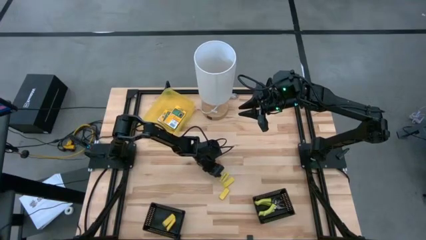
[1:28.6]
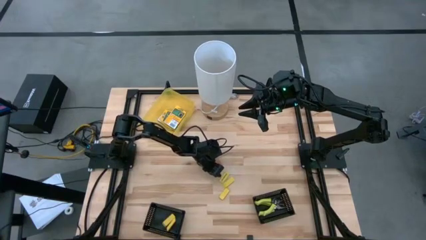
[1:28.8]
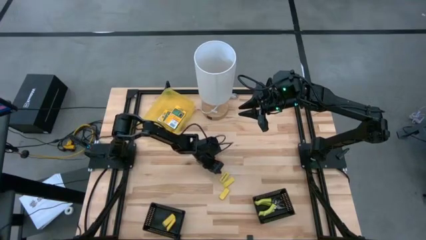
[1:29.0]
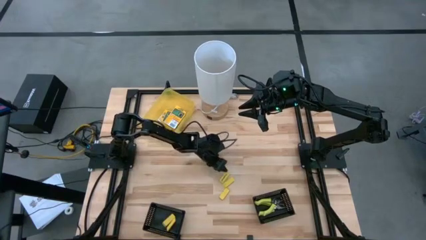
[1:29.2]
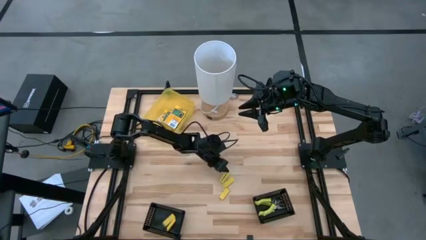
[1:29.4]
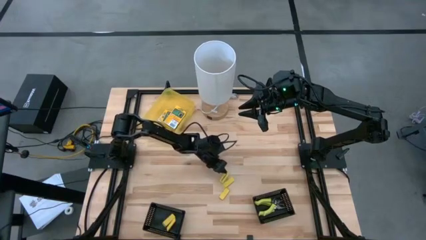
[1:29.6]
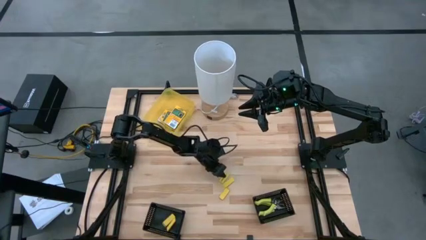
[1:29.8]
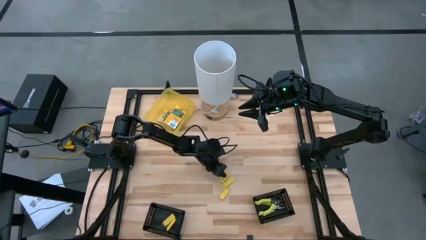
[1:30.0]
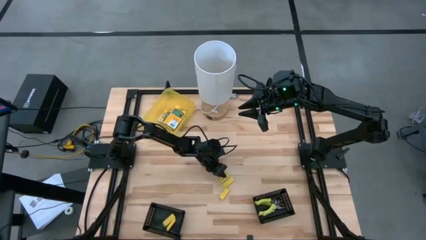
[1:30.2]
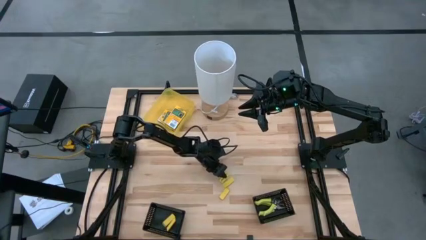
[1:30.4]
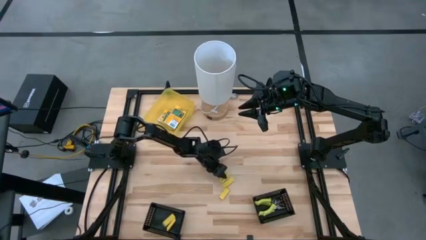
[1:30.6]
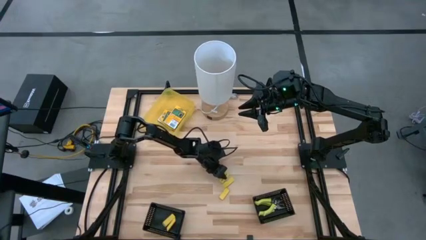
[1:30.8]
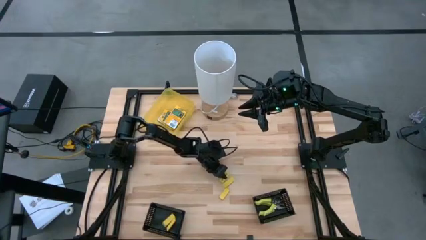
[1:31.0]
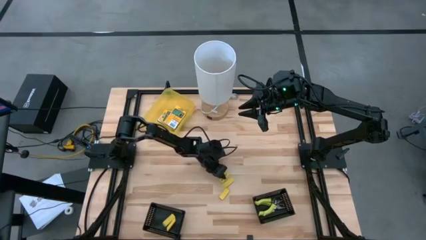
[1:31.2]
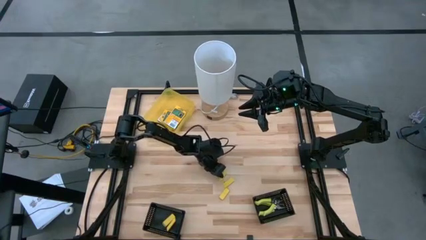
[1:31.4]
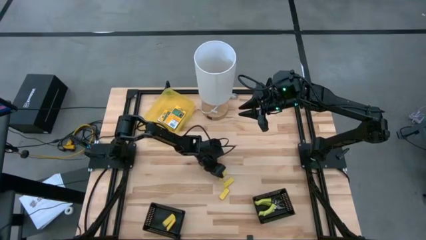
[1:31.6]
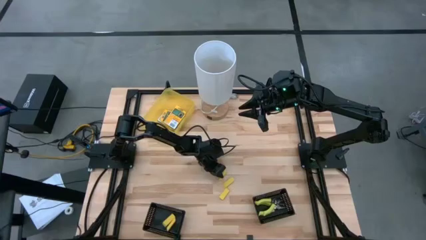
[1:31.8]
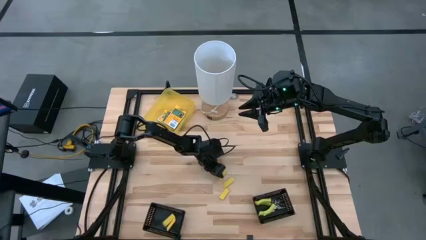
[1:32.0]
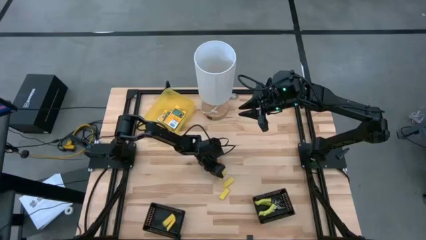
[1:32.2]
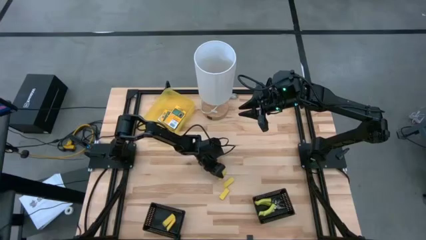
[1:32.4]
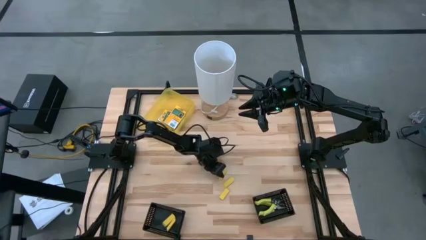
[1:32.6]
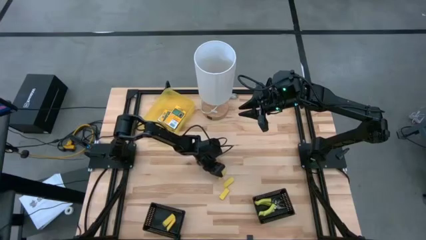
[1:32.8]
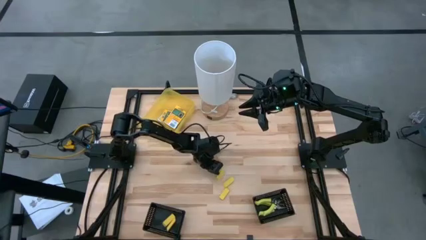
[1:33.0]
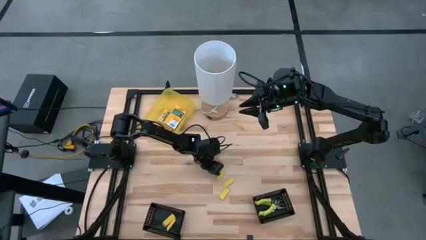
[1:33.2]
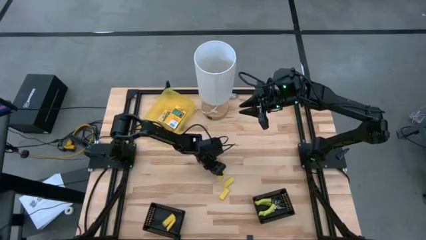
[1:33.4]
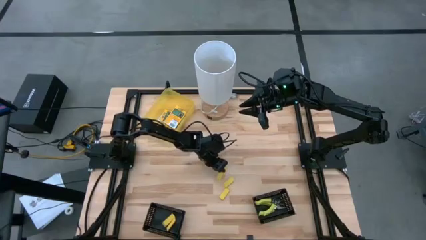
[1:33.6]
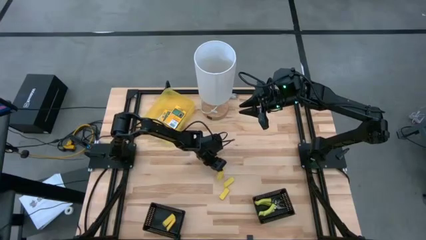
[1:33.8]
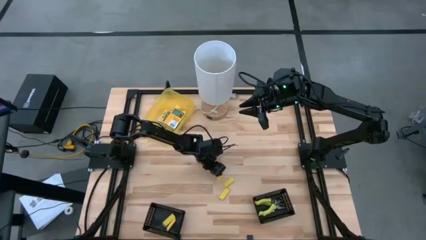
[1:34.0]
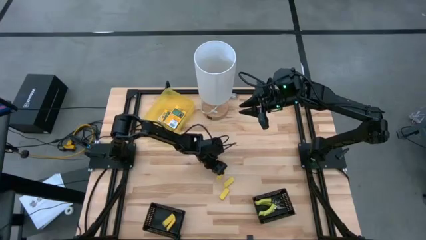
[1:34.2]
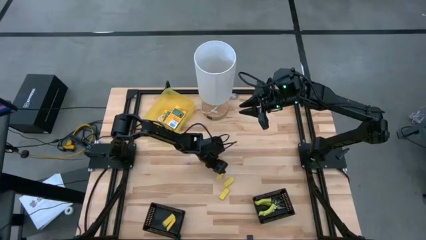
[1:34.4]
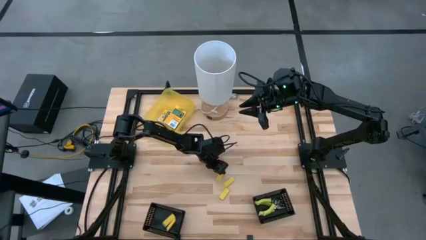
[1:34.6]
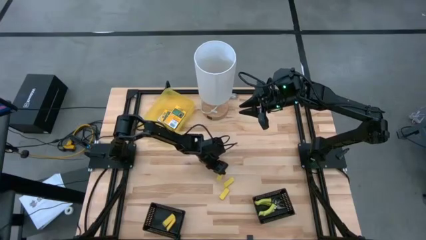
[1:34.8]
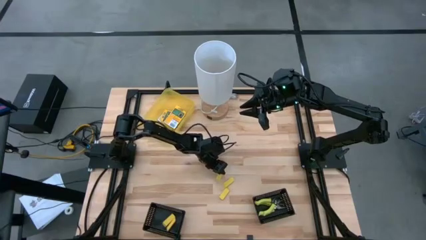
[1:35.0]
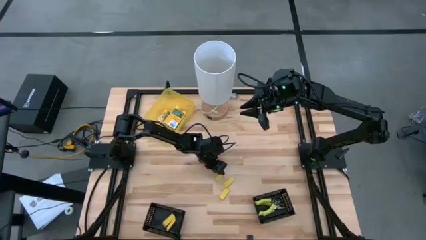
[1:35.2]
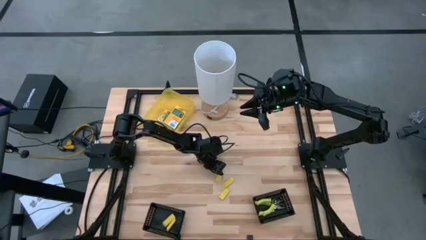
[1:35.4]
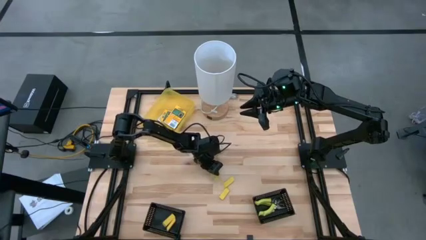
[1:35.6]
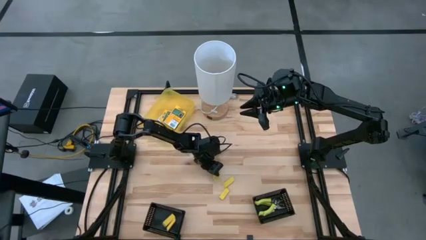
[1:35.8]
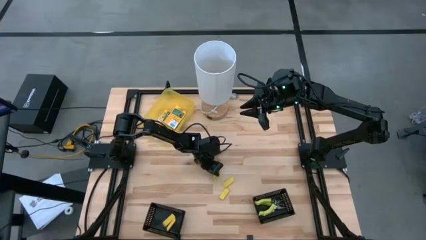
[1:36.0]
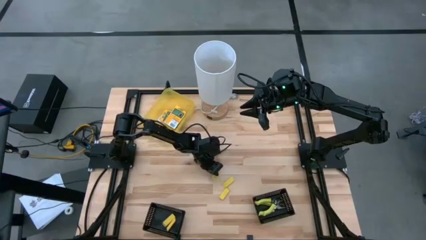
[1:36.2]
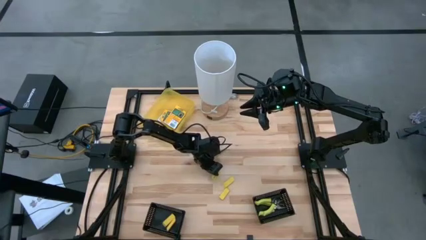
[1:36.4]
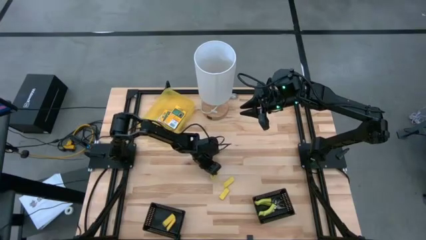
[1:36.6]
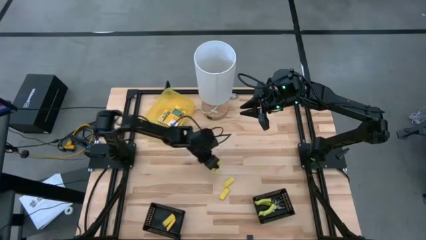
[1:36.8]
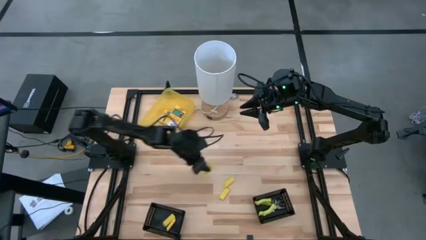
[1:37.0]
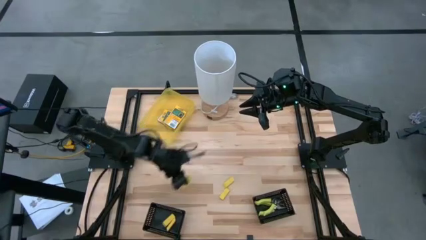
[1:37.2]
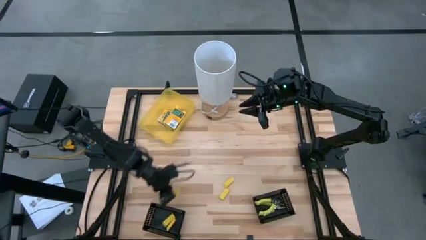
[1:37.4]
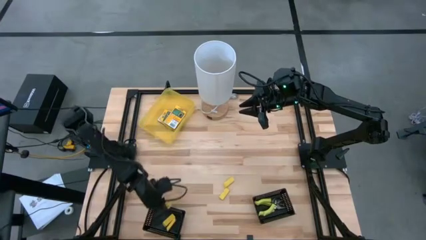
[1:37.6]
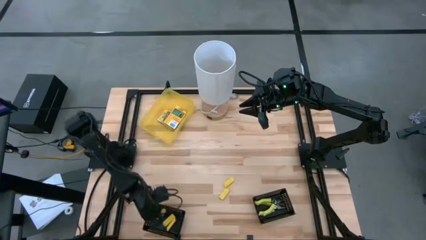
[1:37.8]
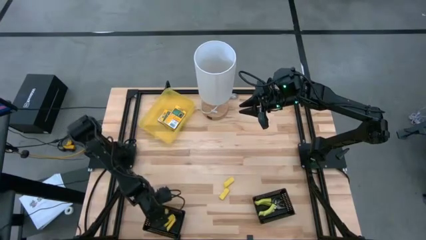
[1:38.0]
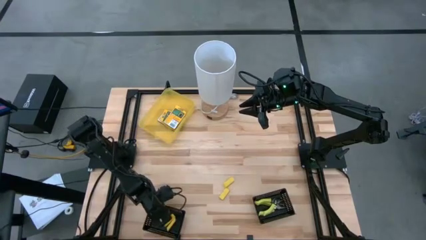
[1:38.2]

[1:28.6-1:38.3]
Task: Pick & Place School Supplies
Put the eraser into the bottom left black bin

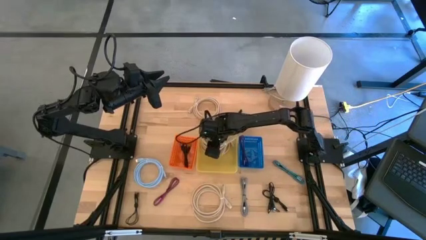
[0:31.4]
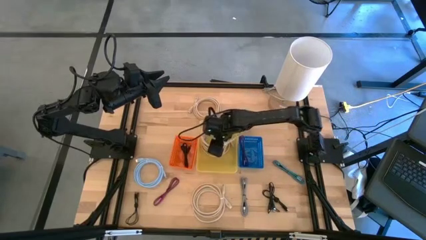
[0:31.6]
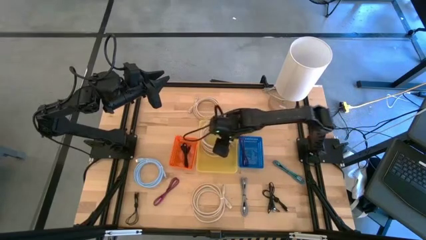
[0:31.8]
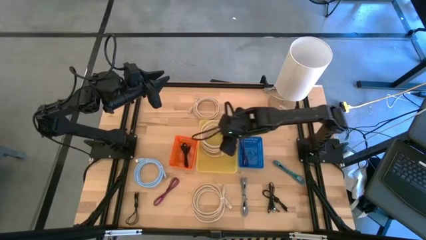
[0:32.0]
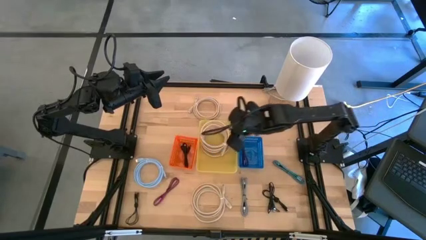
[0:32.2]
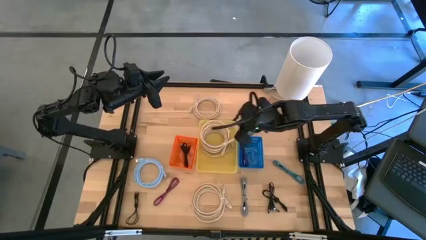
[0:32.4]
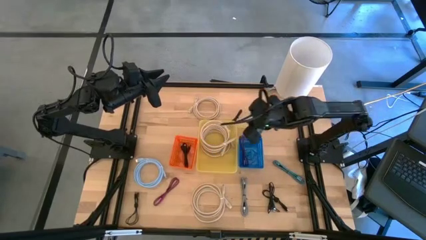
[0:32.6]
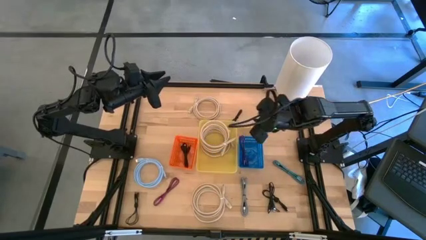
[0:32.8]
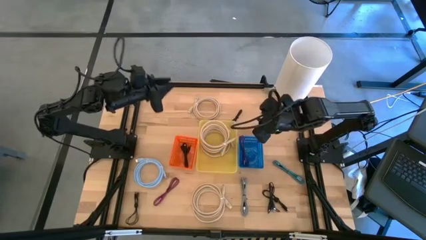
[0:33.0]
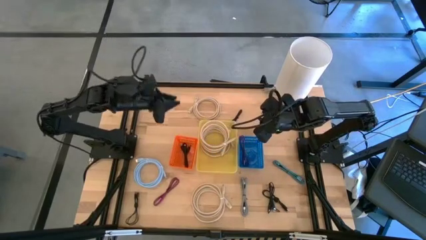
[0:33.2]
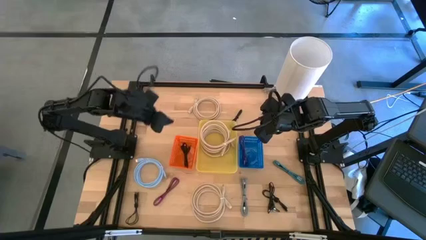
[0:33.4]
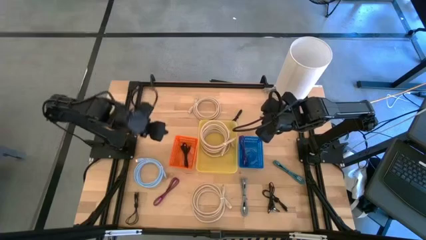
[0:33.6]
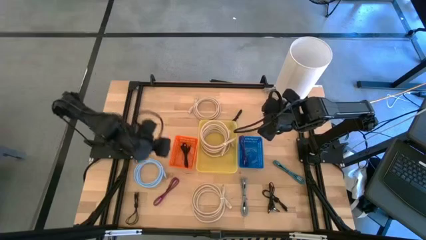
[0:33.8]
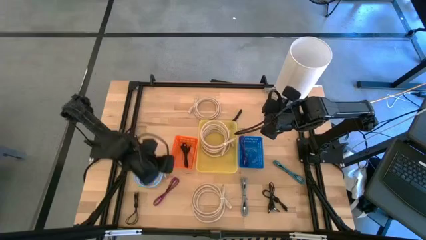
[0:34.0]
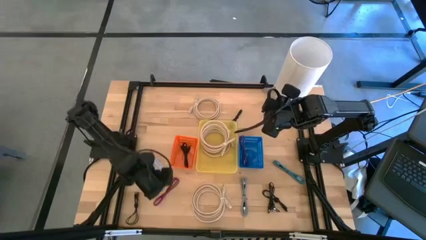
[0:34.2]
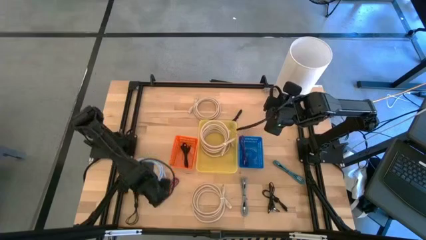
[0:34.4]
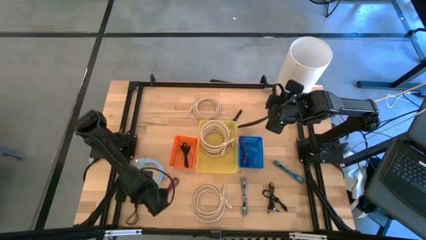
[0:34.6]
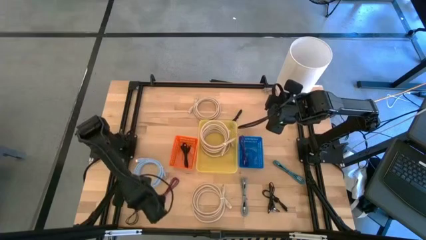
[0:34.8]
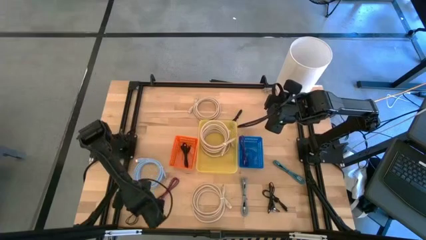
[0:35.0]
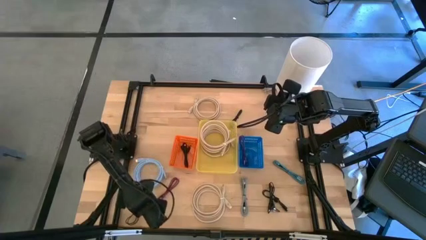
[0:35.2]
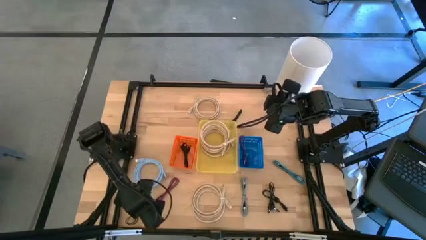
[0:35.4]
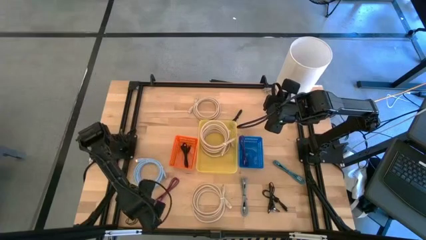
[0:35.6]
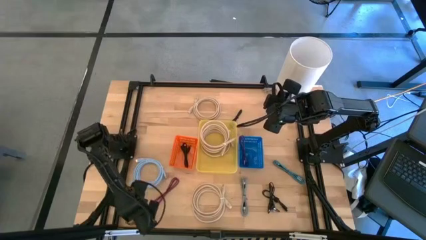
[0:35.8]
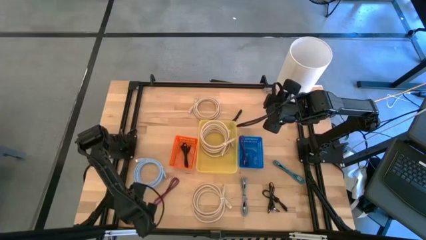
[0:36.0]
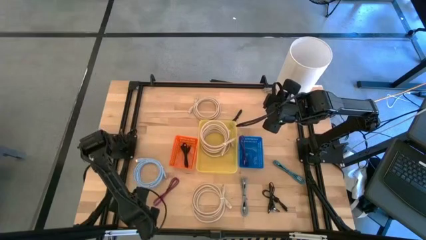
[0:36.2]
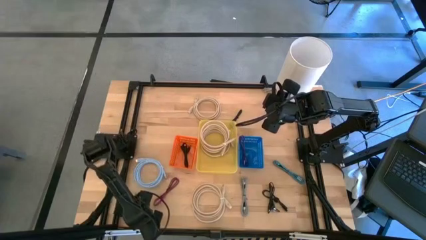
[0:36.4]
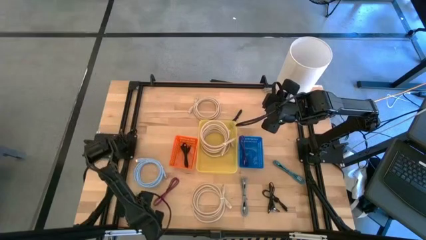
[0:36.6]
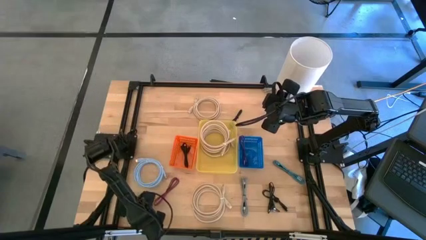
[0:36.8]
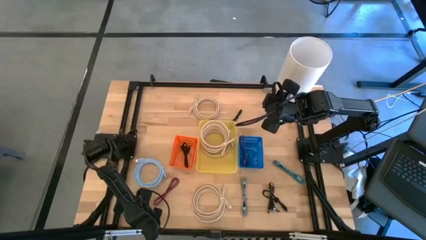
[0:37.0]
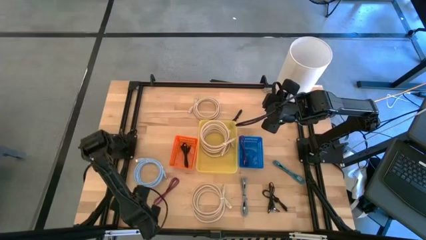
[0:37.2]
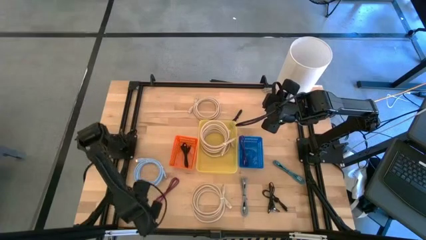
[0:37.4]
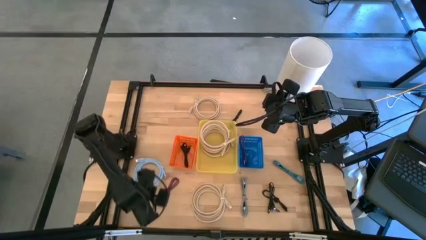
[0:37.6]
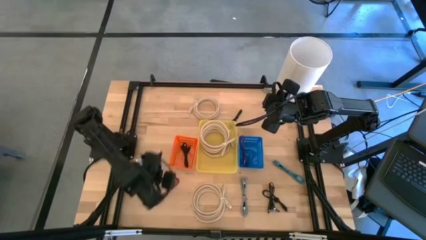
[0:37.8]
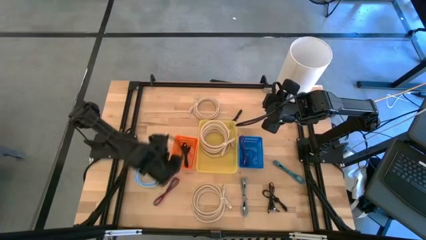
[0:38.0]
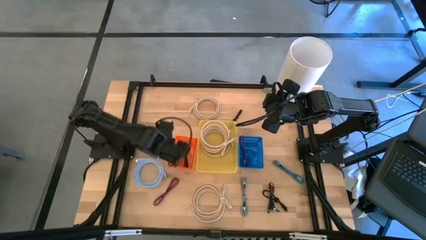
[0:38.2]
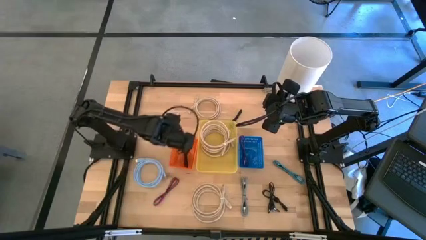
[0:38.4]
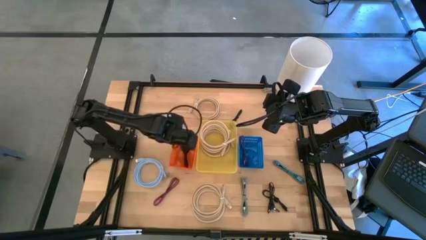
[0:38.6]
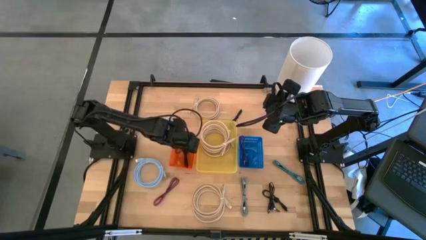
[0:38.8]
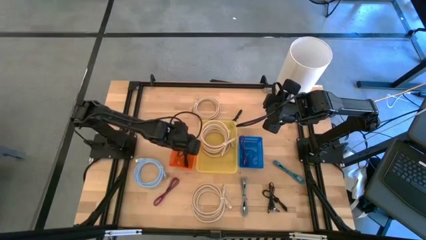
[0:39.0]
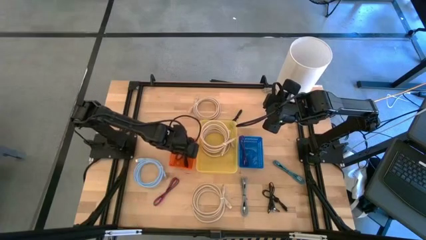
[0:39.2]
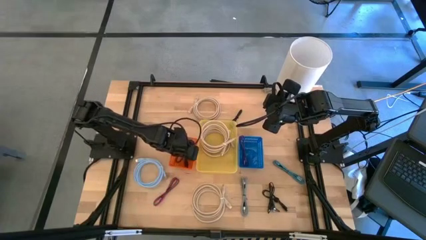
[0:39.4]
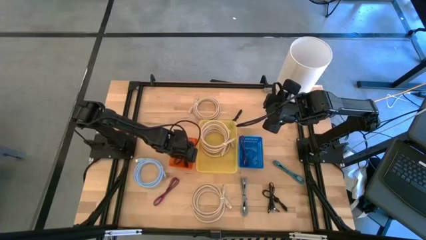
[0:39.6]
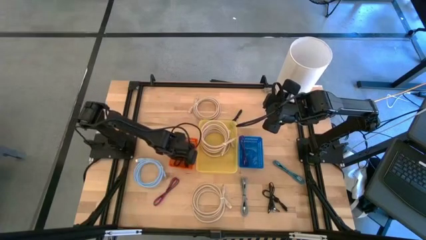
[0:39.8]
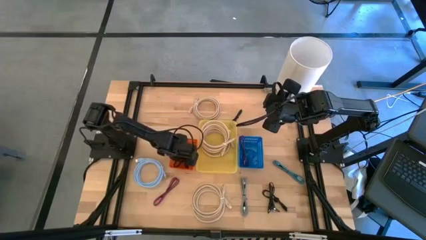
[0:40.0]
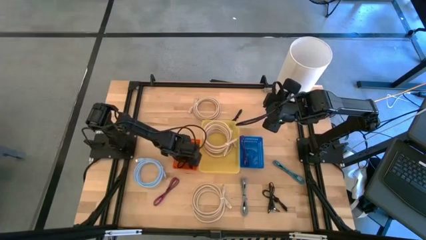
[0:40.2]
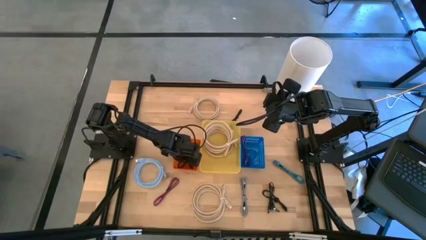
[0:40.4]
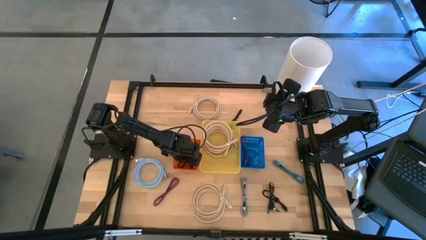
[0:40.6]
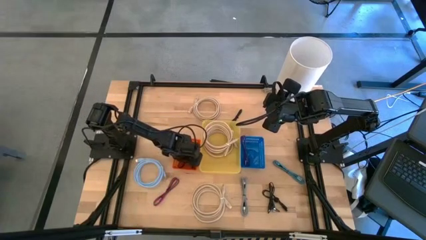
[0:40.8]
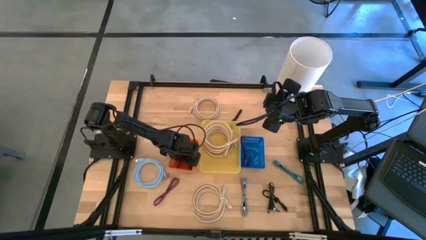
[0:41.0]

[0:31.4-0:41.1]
Task: Pick & Place USB Port
Put the black usb cable into the orange bin
